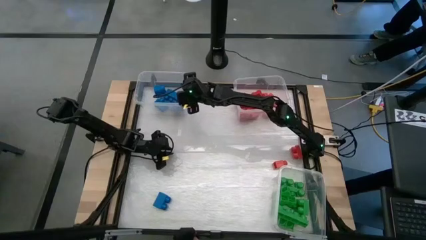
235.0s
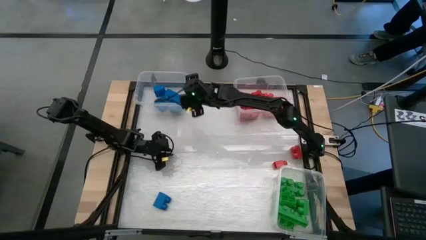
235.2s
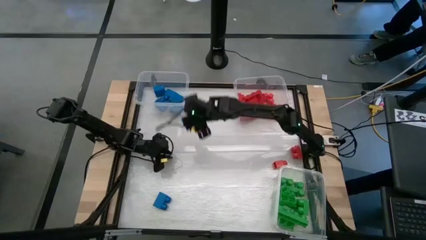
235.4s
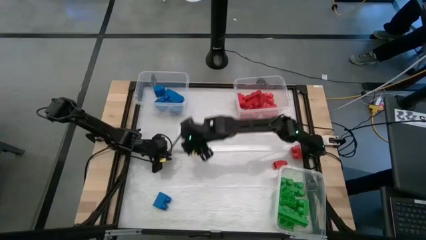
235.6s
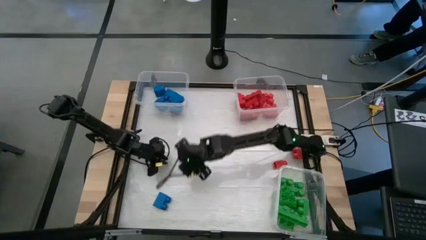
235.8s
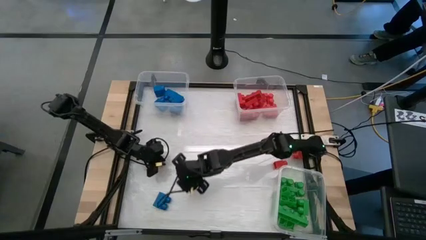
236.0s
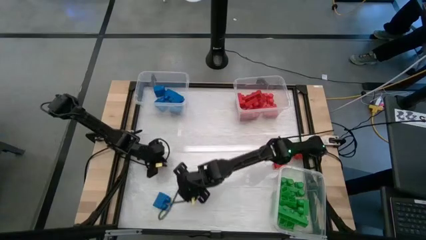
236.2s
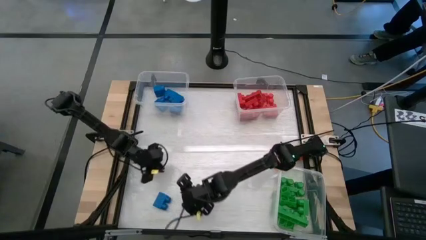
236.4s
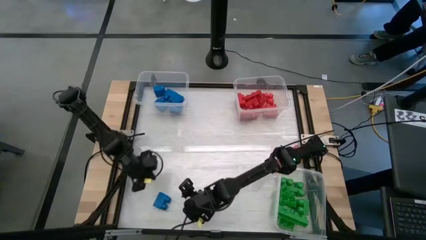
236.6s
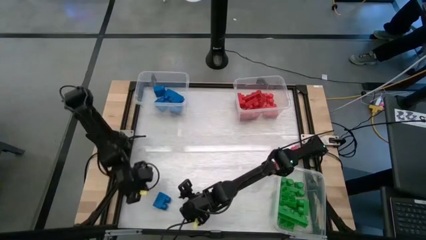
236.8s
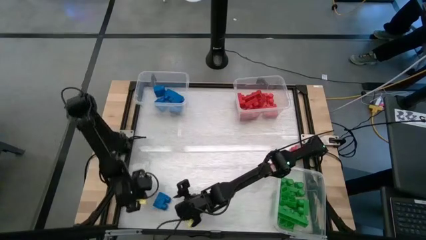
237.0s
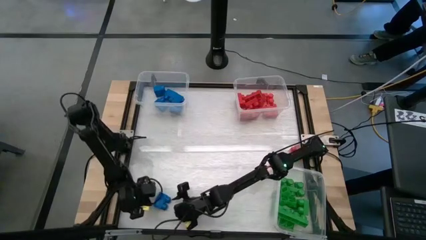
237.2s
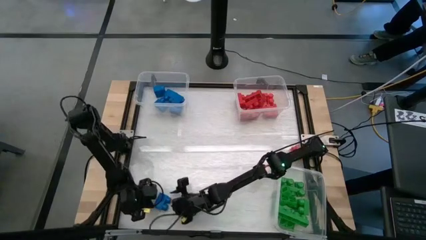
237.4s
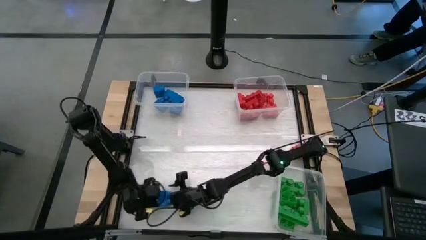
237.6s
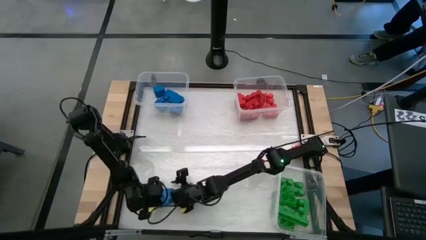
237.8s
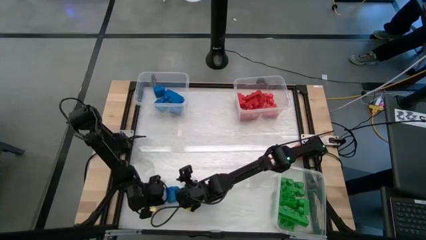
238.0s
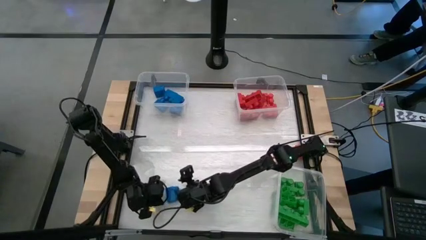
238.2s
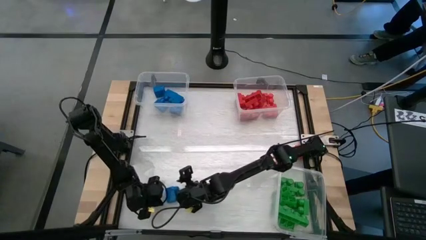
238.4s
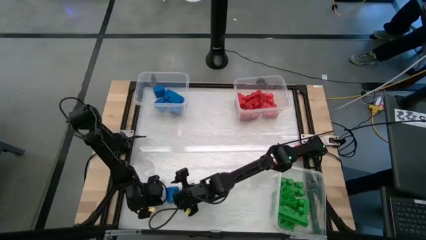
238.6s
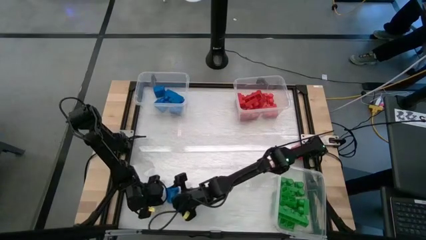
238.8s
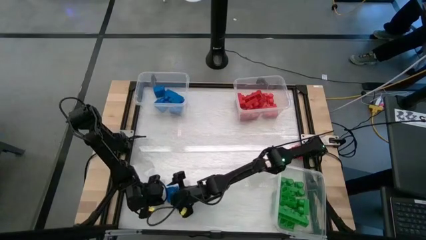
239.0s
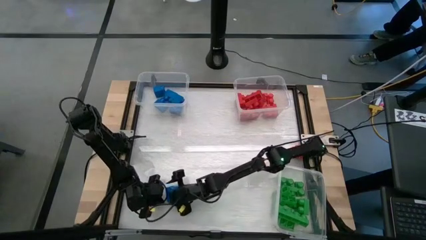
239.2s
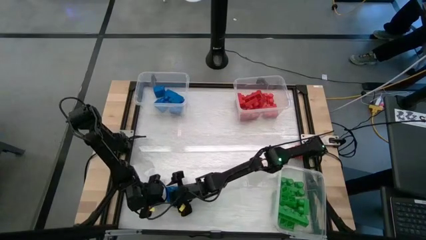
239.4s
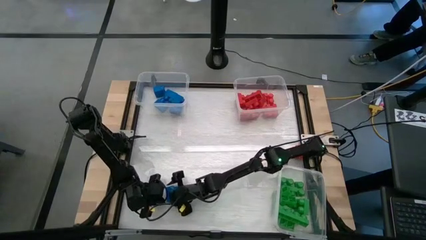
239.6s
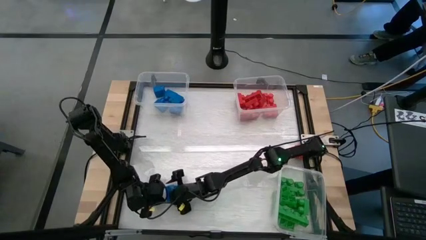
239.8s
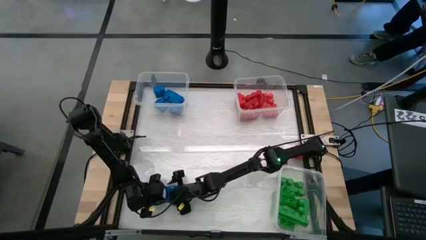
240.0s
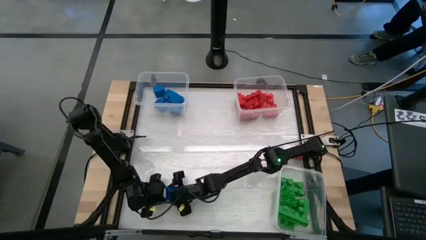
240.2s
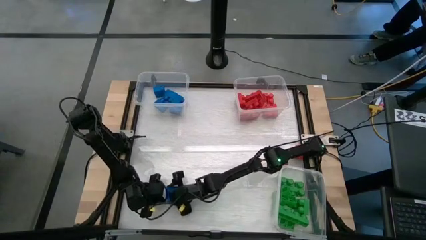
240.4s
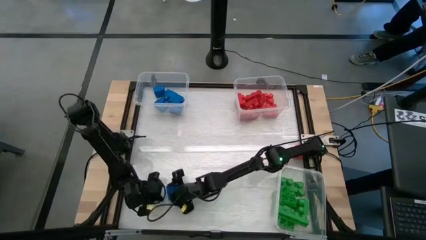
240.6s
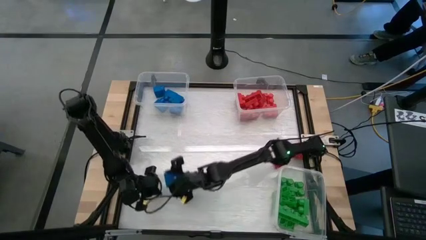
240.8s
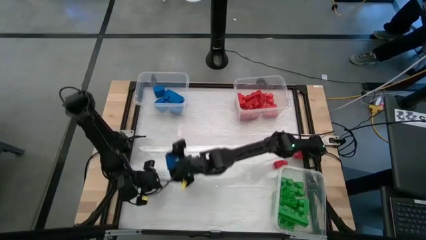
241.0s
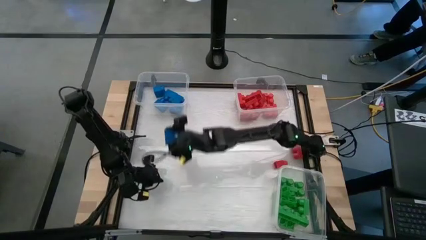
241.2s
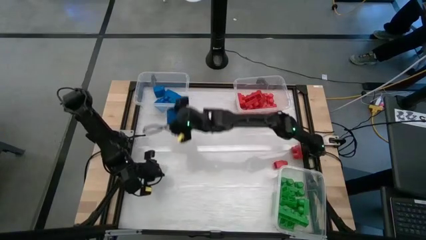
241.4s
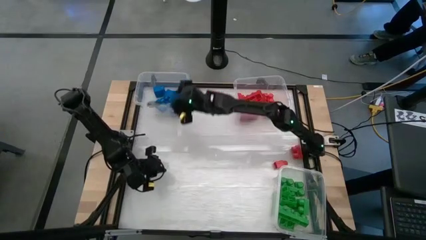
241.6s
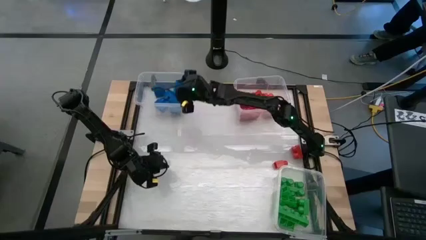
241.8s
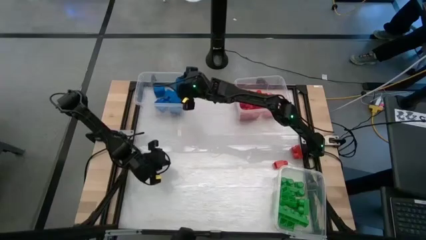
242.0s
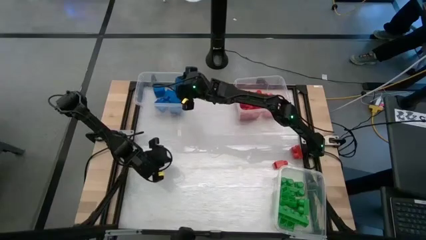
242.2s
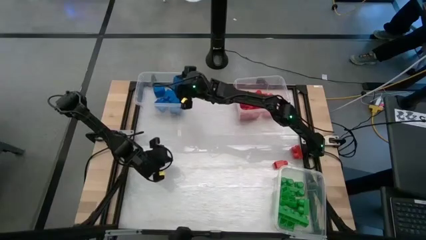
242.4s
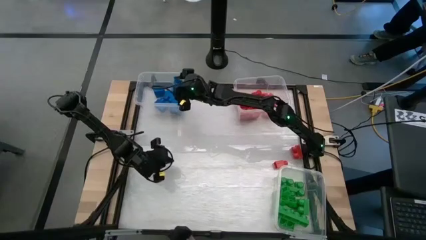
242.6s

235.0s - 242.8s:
Task: Sort blocks
Put the blue game piece into the top left transparent bin

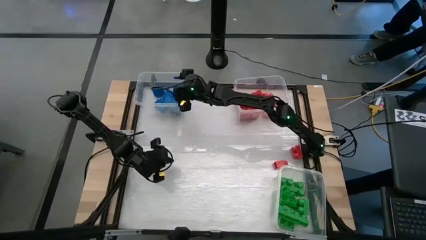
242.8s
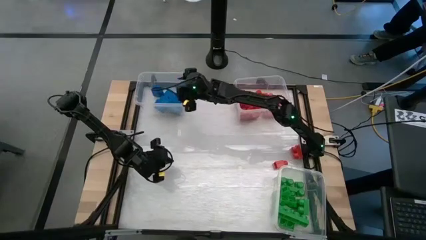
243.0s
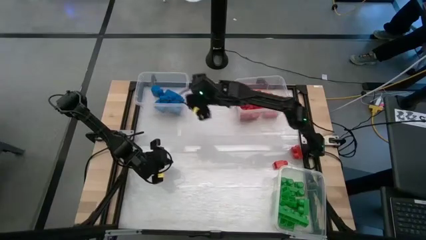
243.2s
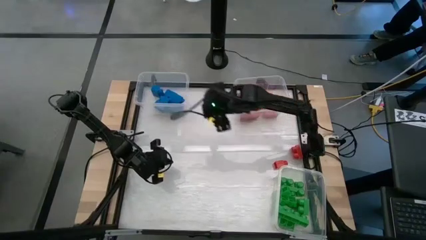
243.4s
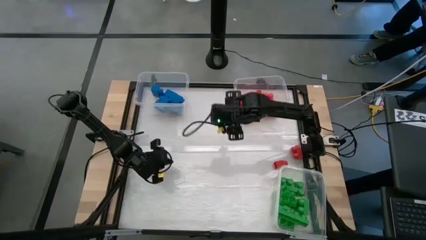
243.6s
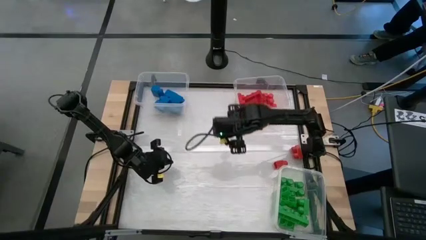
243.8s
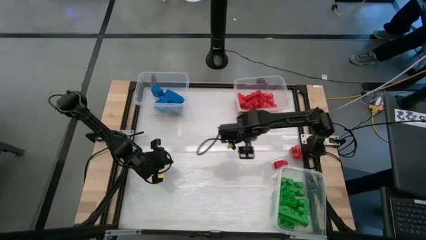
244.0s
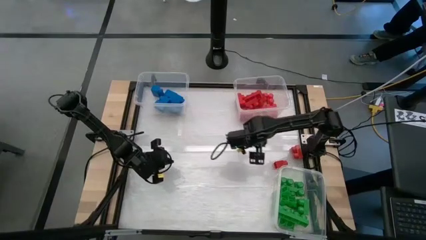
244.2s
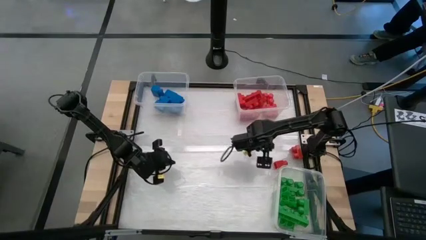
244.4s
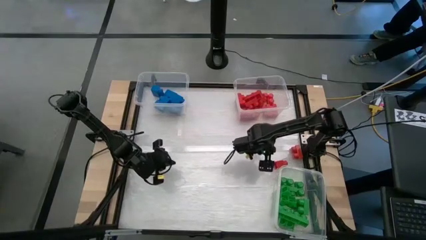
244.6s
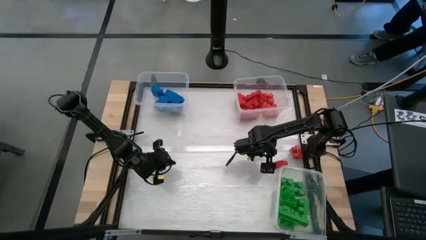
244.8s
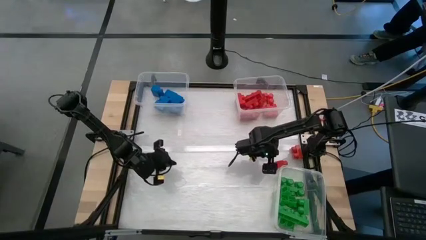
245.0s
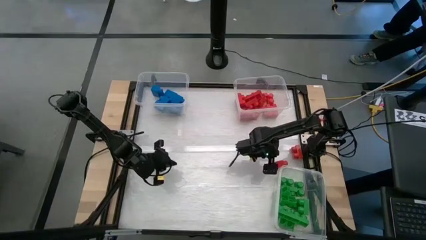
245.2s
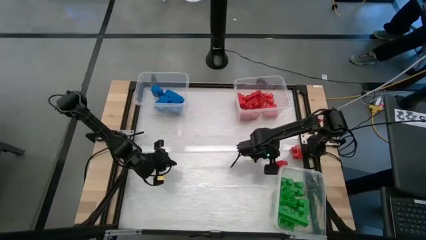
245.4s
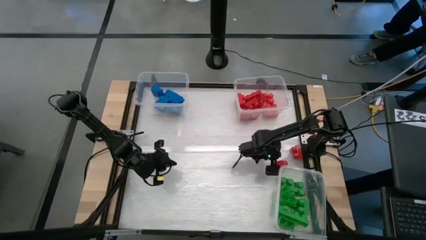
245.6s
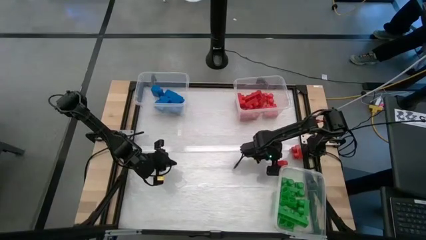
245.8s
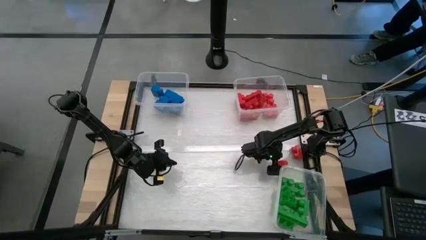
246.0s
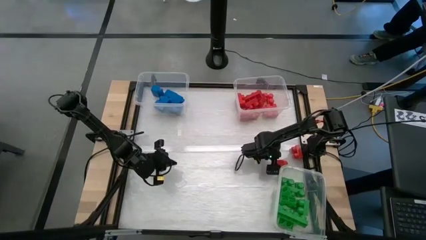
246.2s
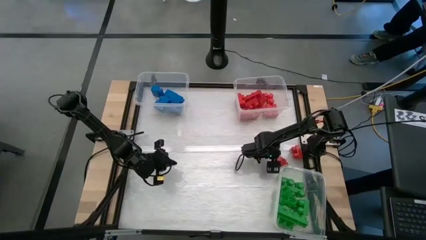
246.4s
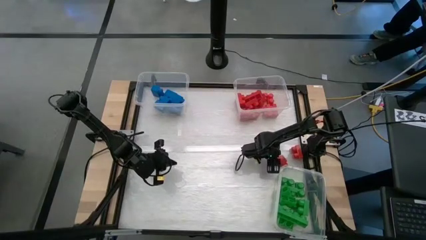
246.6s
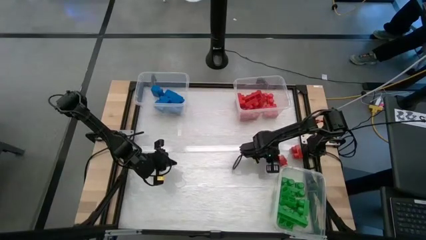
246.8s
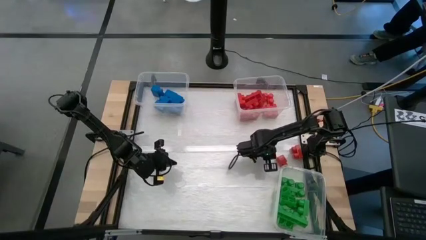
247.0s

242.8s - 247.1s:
Put the red game piece into the top right transparent bin

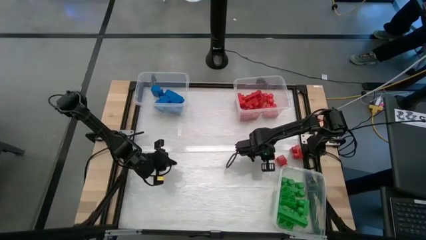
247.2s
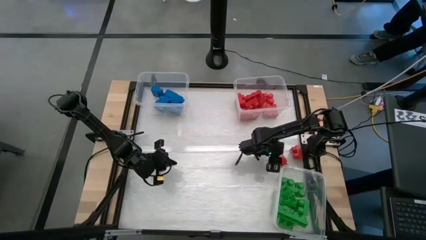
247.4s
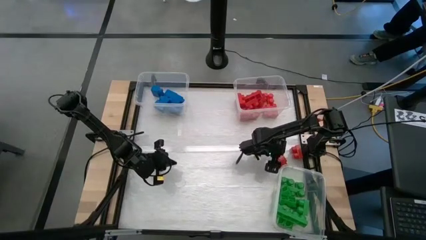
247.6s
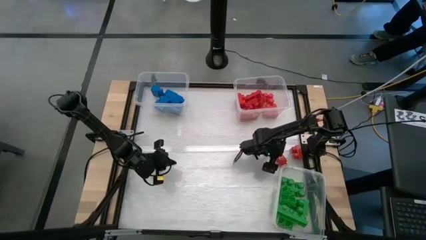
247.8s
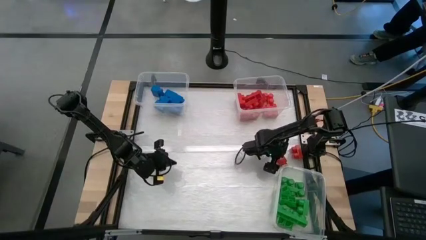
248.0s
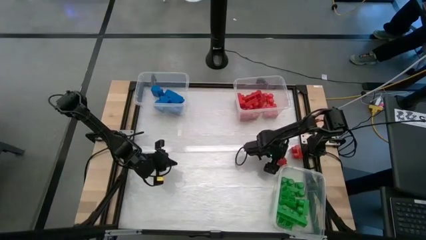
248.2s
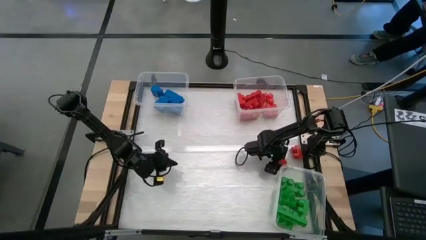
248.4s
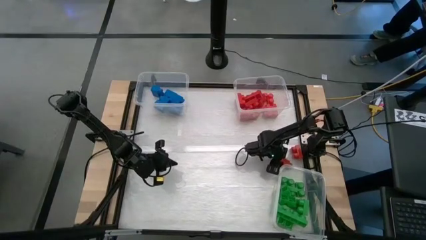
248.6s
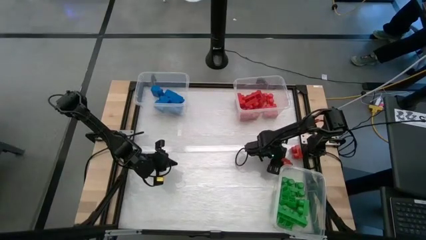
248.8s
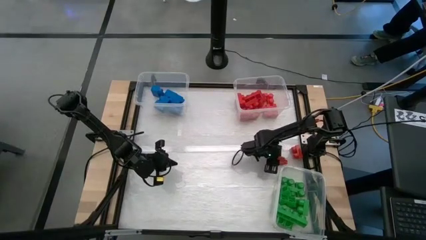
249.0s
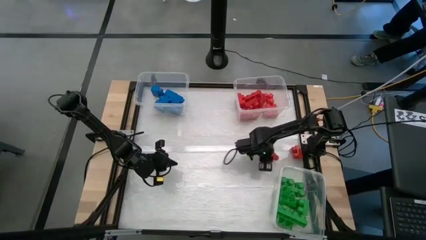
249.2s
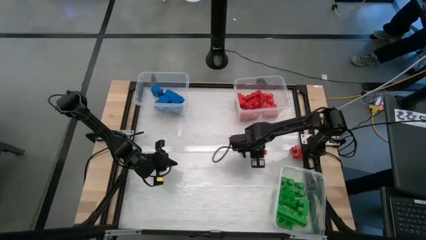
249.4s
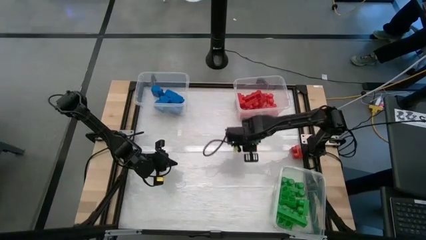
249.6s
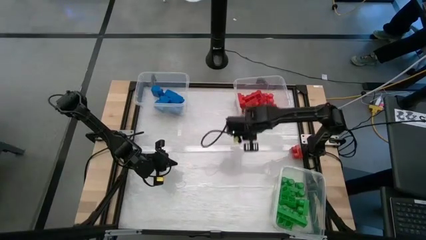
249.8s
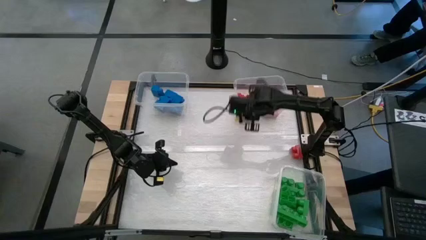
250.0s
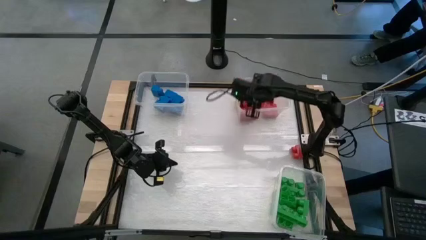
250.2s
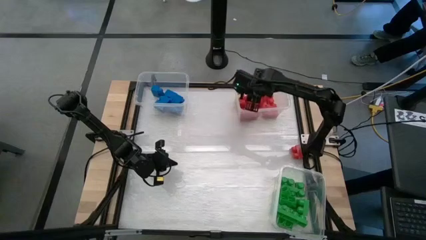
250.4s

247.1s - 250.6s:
Put the red game piece into the top right transparent bin
